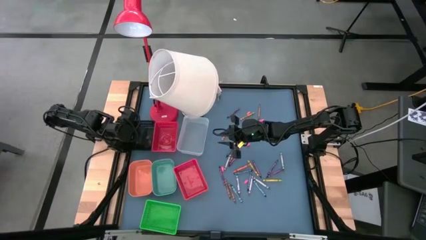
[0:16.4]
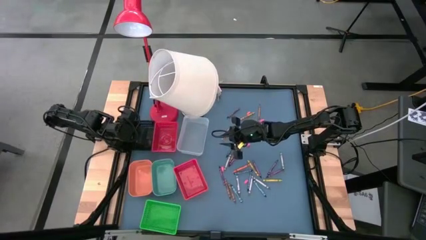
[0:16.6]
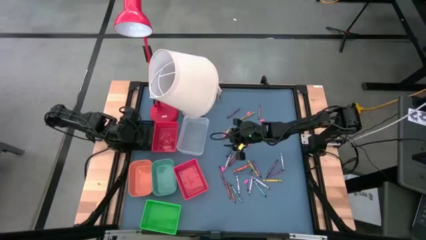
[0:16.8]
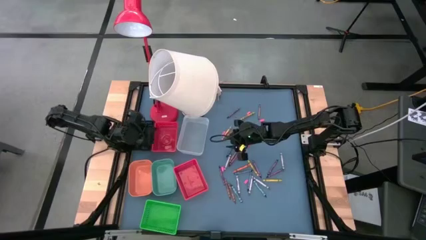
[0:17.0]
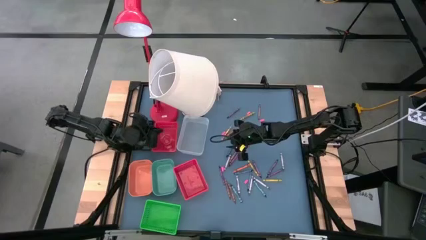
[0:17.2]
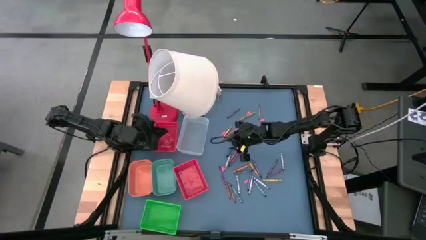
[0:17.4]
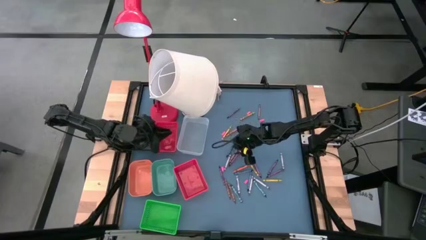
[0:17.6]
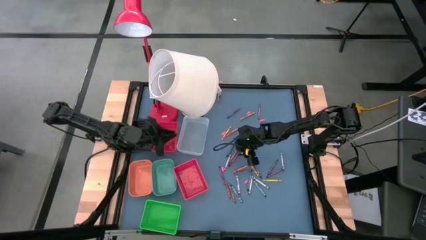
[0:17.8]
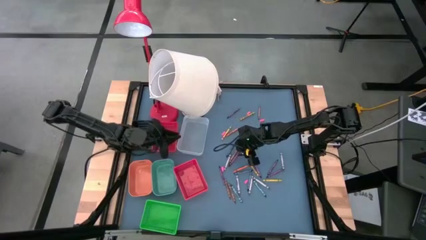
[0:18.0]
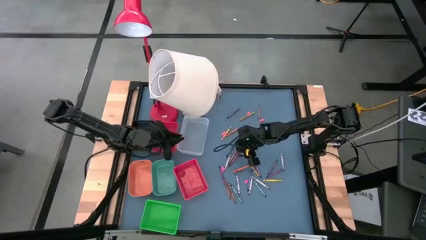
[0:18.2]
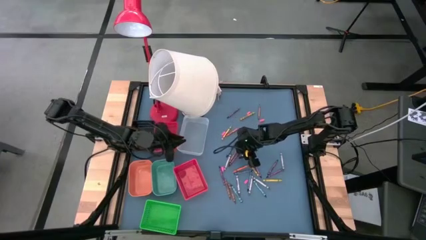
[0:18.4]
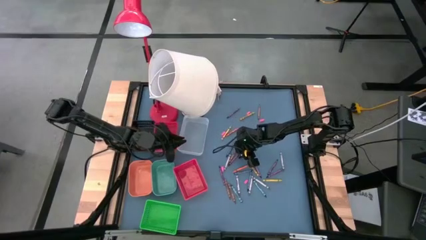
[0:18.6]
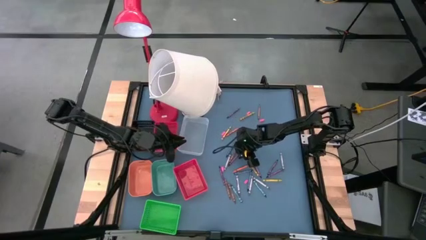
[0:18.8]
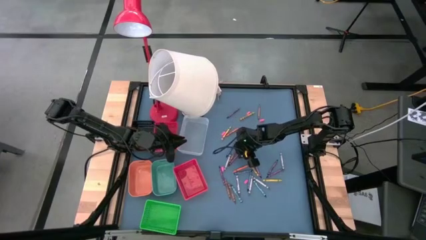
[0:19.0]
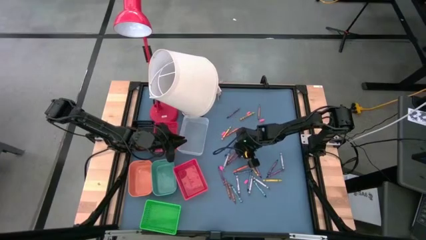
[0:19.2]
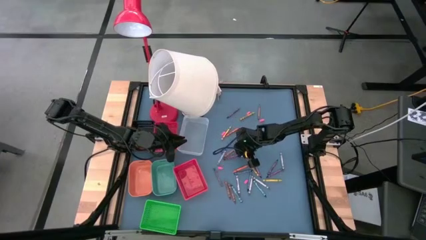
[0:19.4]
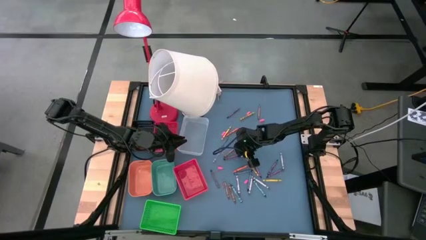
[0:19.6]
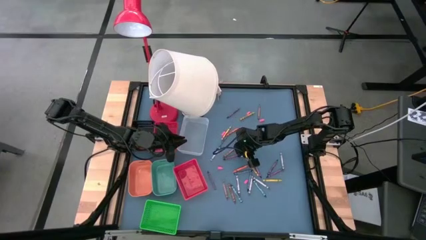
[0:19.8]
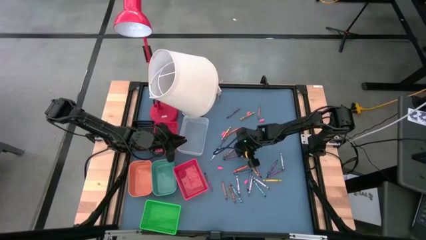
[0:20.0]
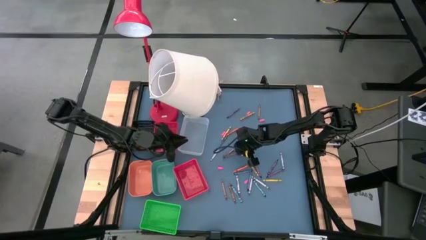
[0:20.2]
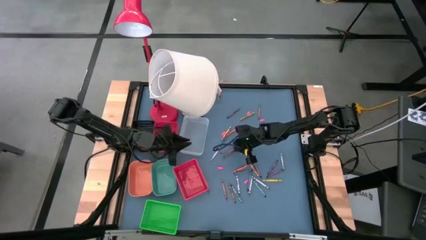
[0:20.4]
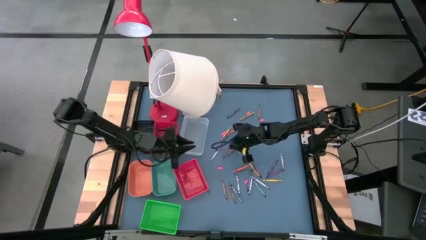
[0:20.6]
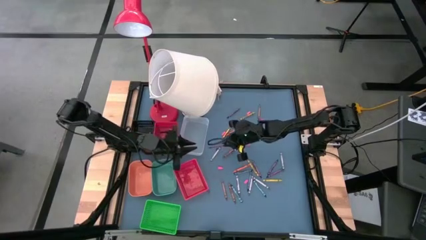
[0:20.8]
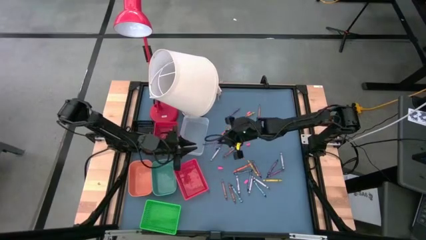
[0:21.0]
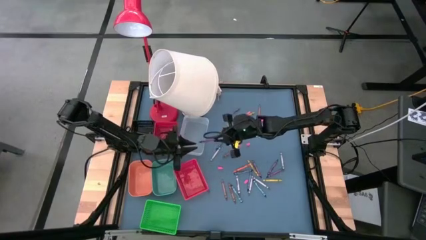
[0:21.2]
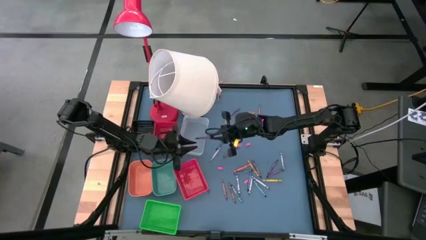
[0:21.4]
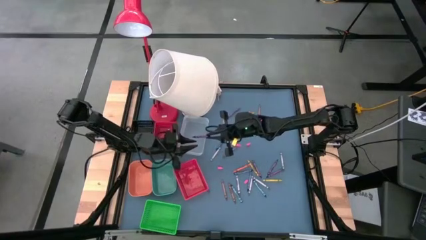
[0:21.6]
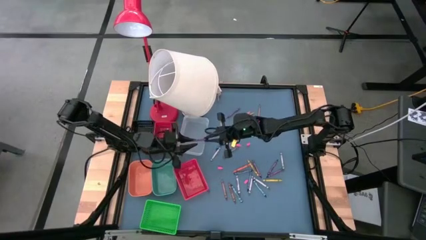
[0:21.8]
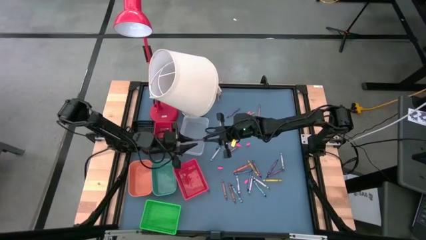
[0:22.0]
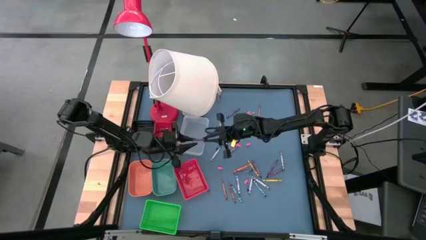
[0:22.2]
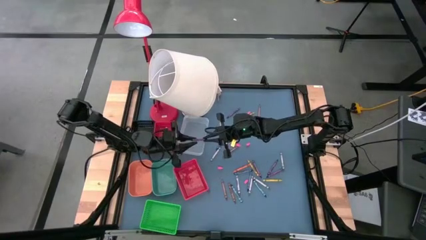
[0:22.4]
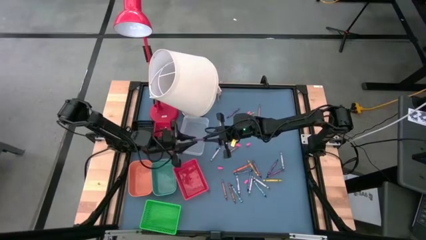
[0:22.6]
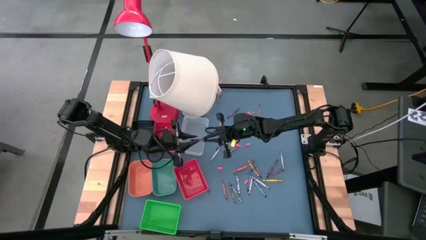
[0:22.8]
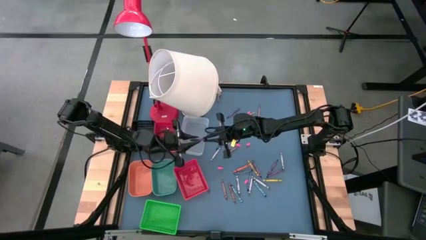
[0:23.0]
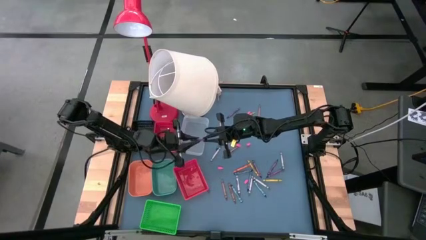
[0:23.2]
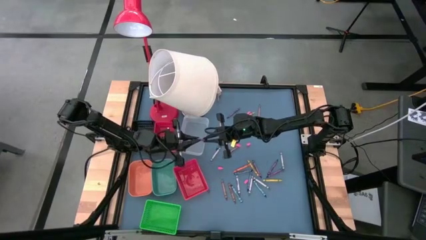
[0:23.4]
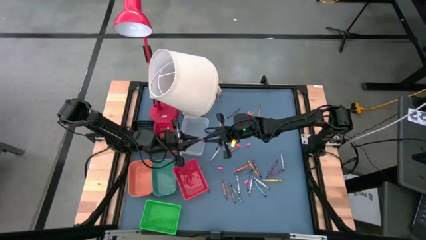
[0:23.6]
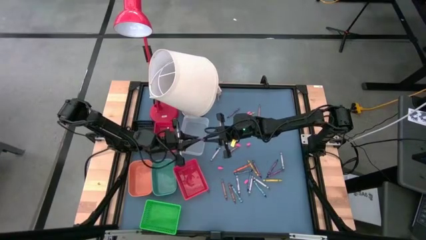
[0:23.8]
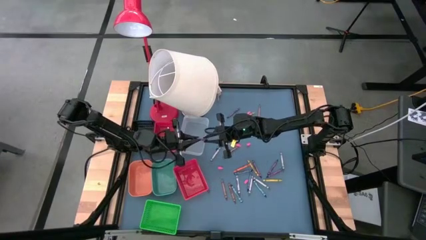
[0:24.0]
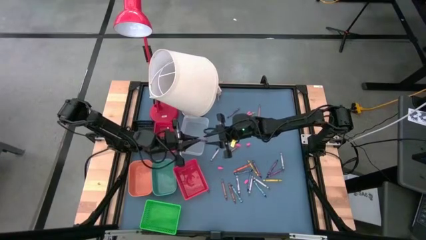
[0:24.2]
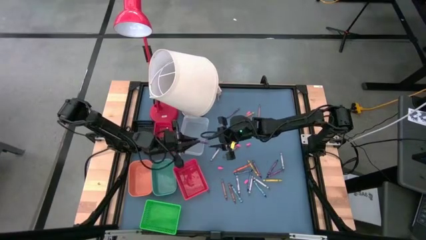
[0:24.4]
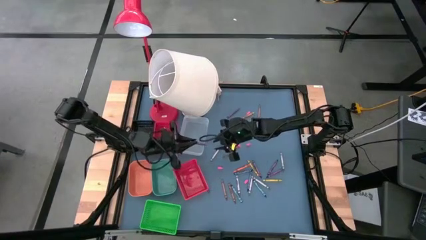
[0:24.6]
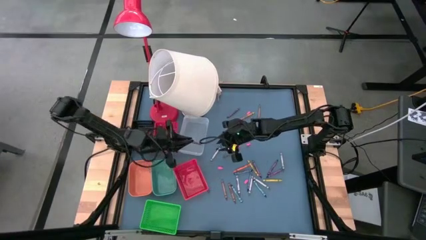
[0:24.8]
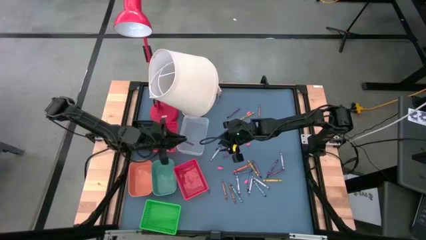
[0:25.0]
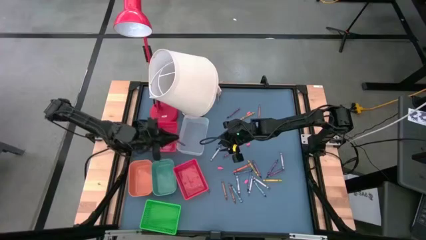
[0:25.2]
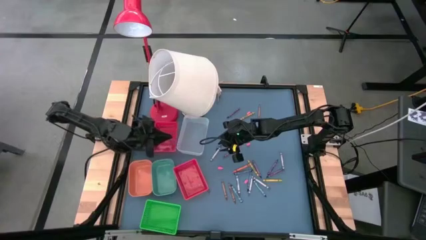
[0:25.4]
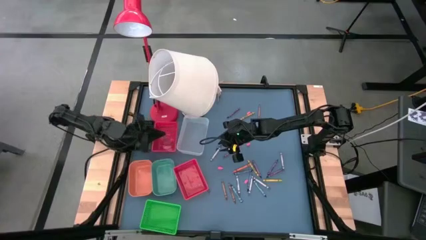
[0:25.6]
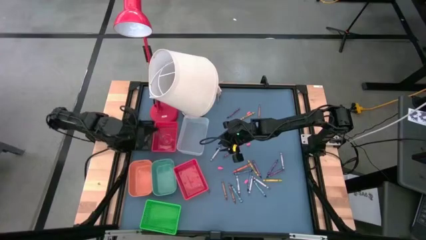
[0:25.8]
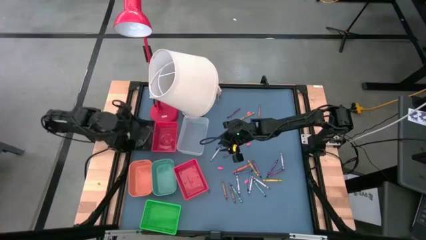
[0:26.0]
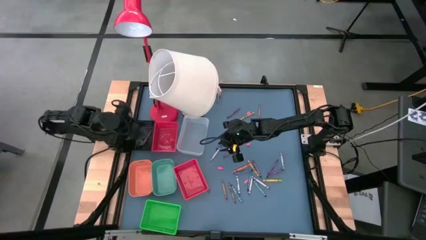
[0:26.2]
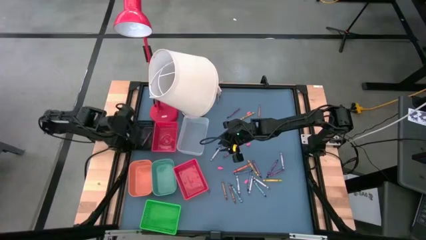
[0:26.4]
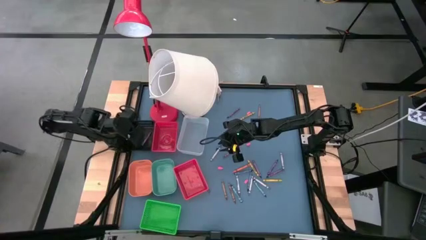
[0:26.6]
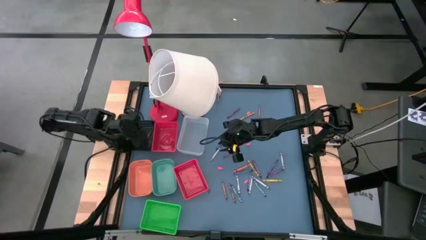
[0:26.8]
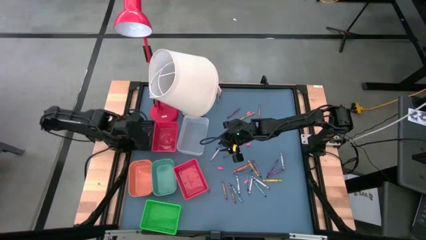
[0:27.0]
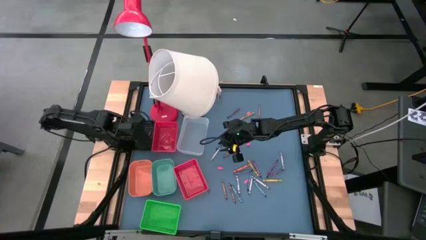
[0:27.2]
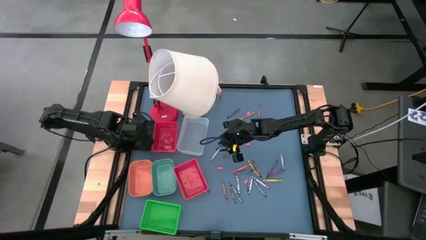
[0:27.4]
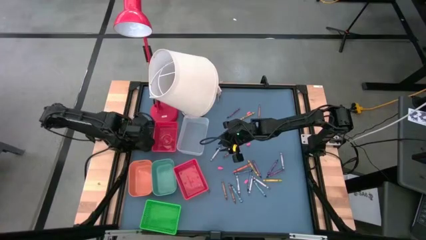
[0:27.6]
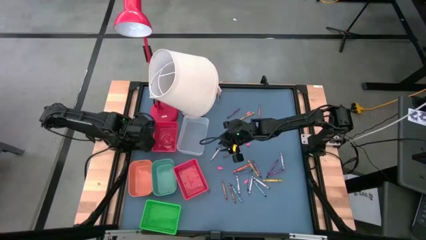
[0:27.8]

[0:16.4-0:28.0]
Task: Sort crayons
Put the violet crayon into the black bin
